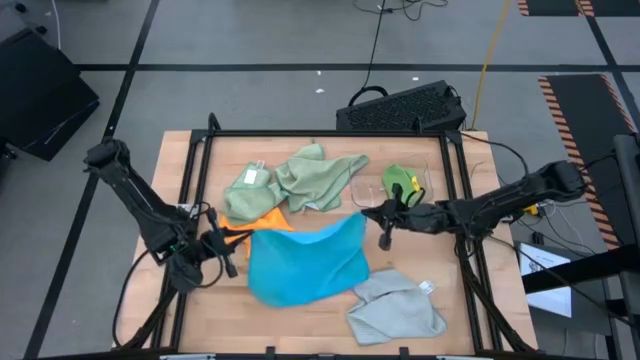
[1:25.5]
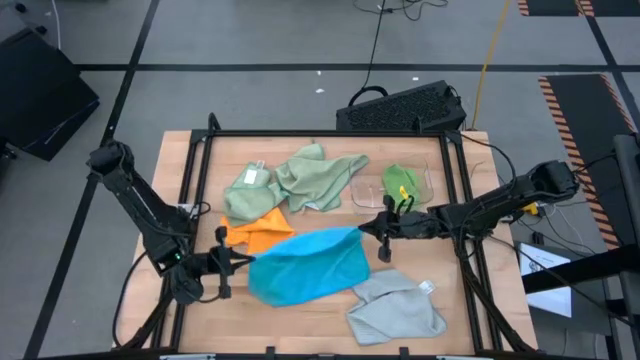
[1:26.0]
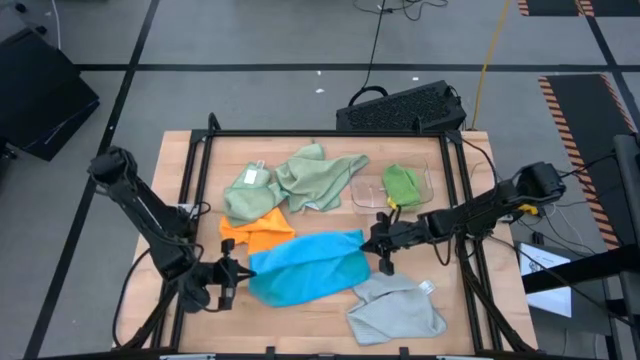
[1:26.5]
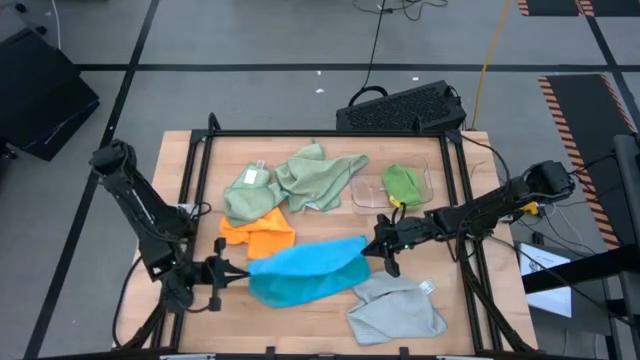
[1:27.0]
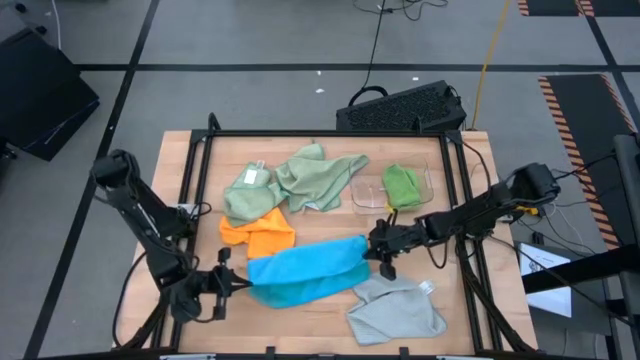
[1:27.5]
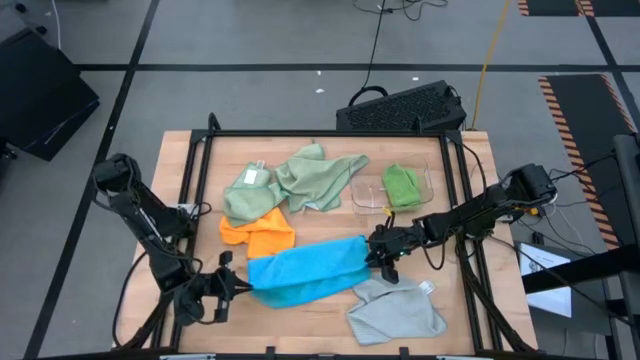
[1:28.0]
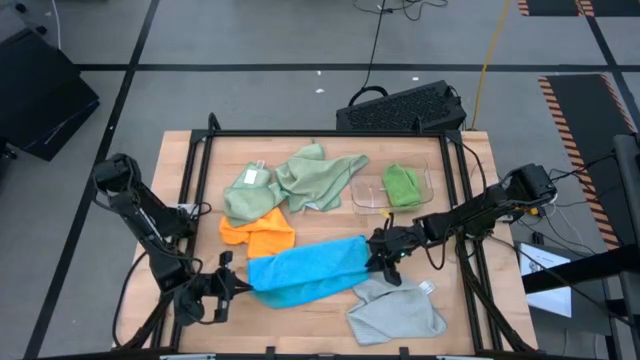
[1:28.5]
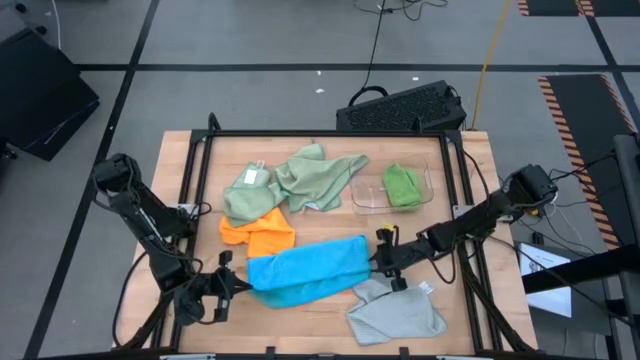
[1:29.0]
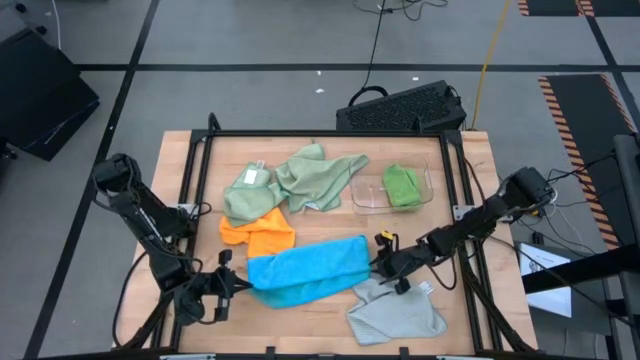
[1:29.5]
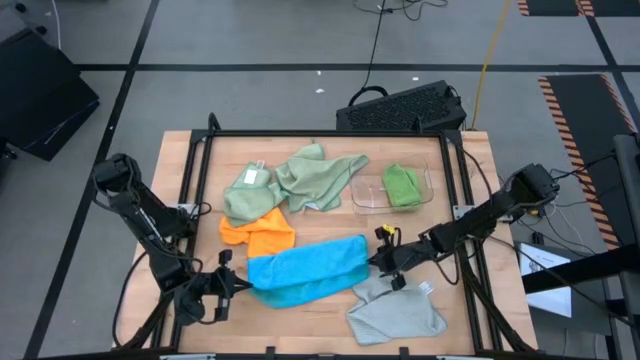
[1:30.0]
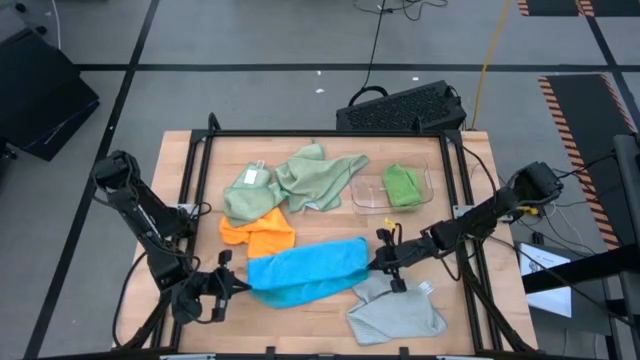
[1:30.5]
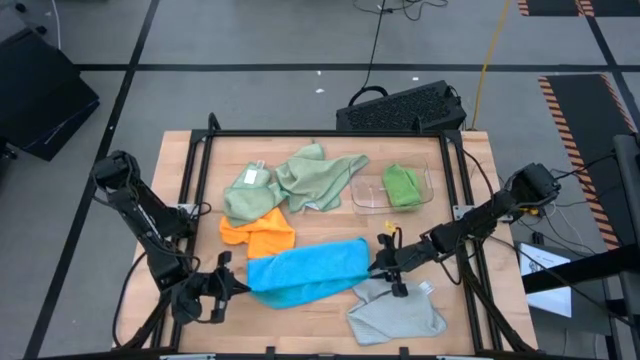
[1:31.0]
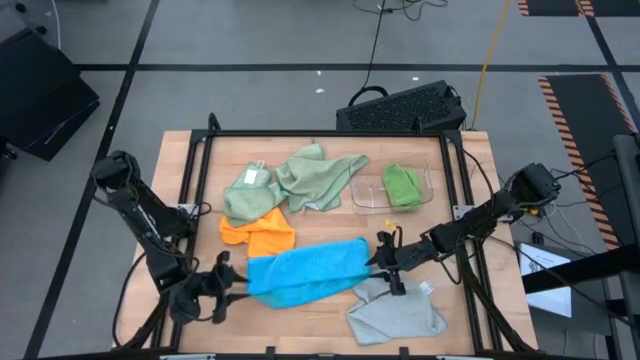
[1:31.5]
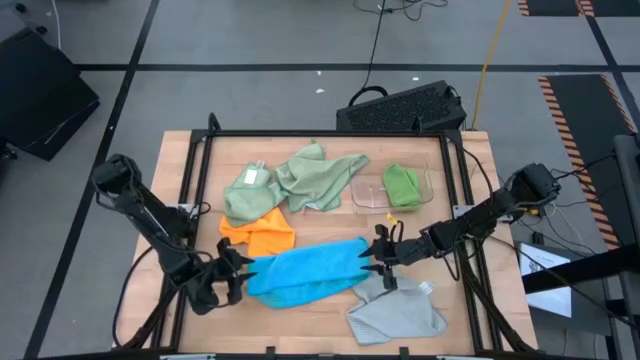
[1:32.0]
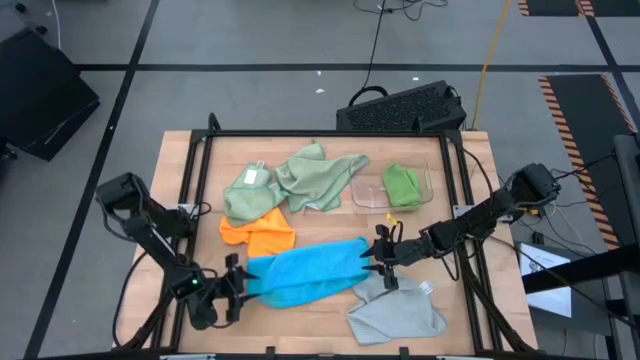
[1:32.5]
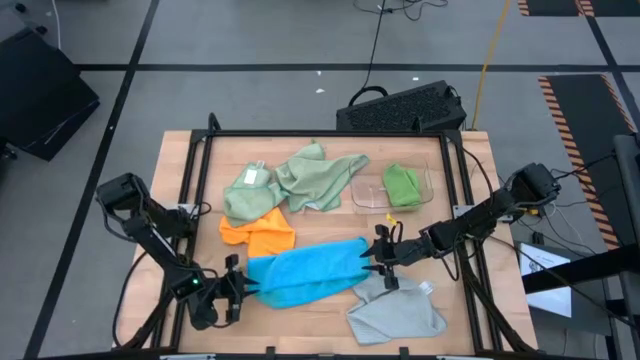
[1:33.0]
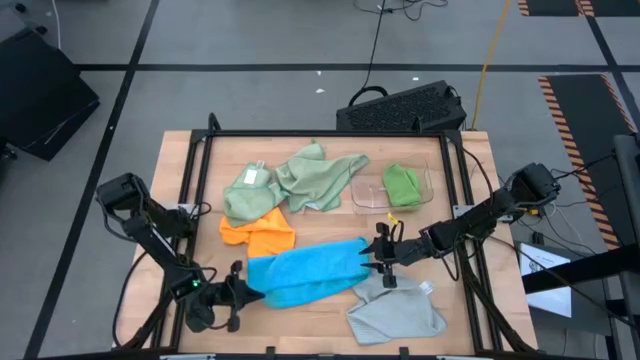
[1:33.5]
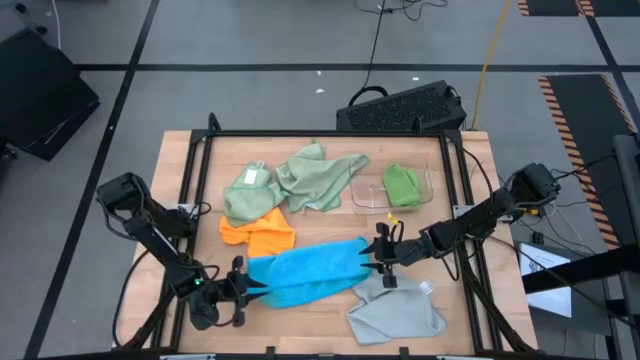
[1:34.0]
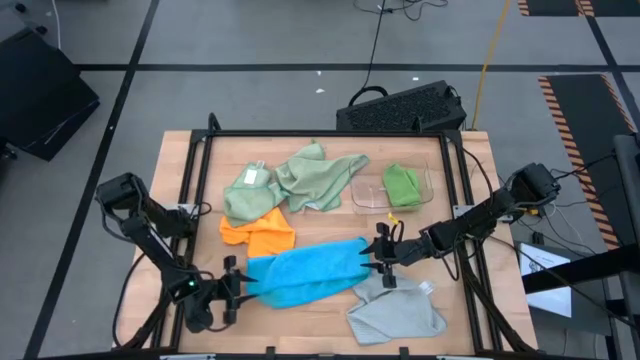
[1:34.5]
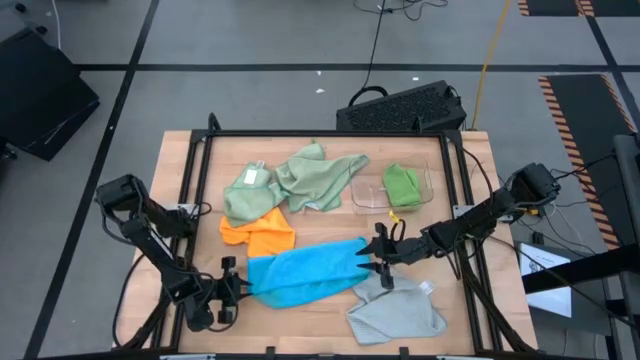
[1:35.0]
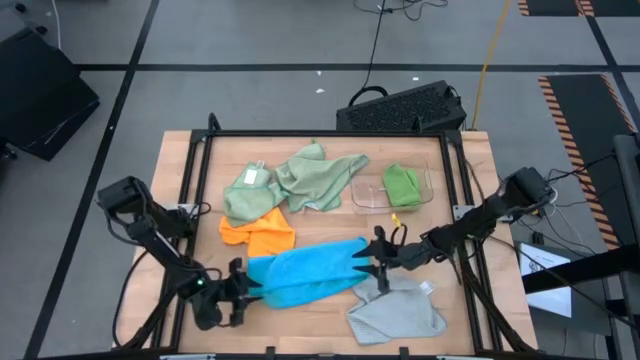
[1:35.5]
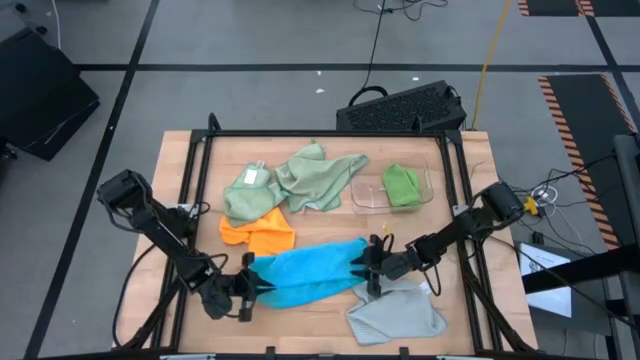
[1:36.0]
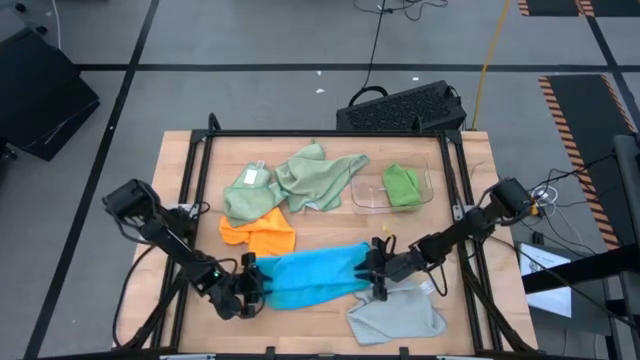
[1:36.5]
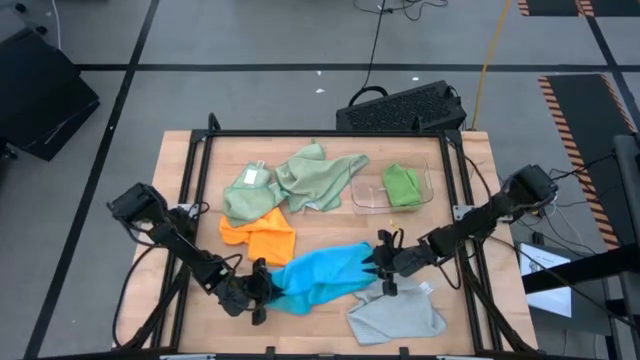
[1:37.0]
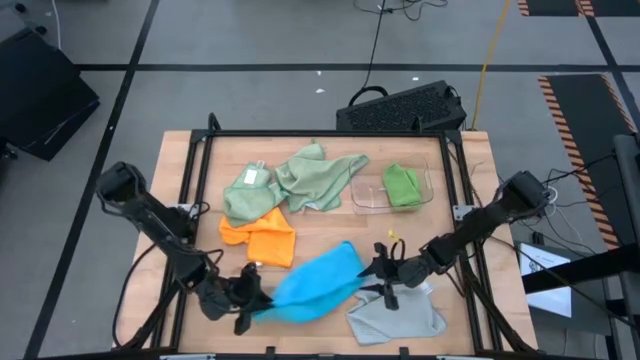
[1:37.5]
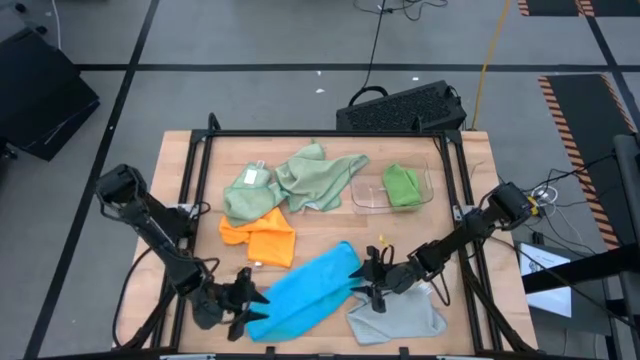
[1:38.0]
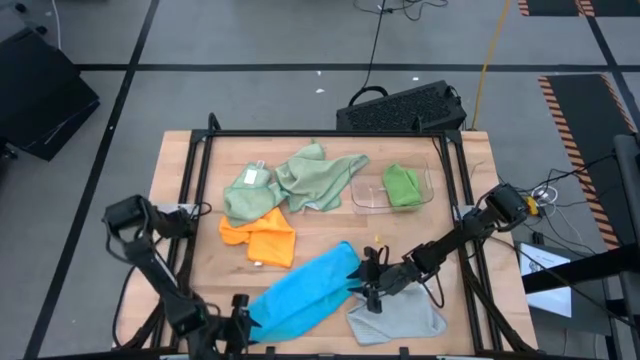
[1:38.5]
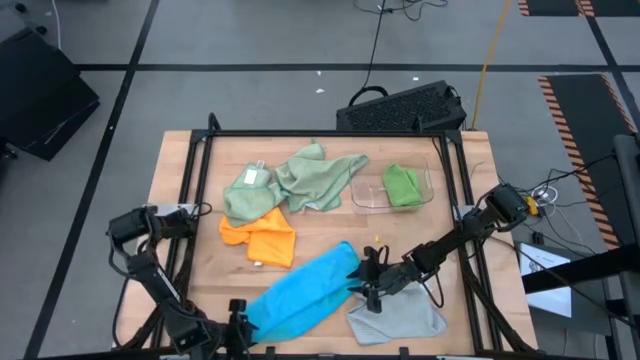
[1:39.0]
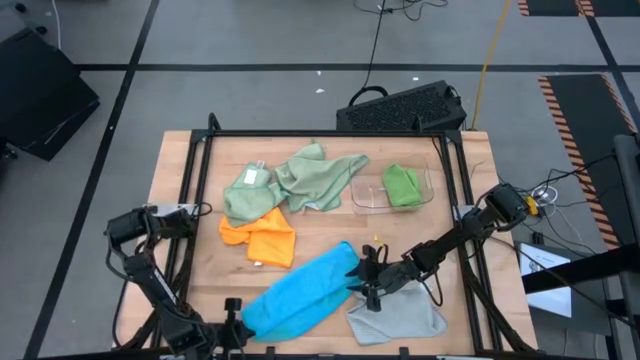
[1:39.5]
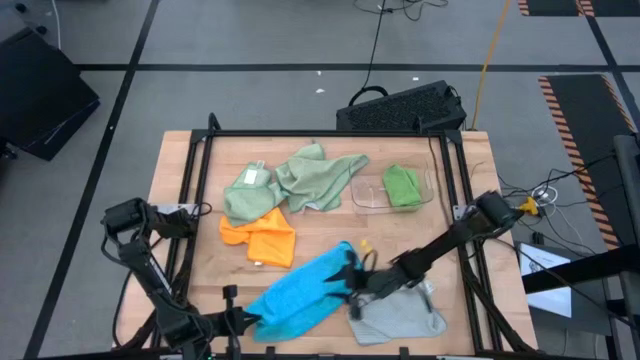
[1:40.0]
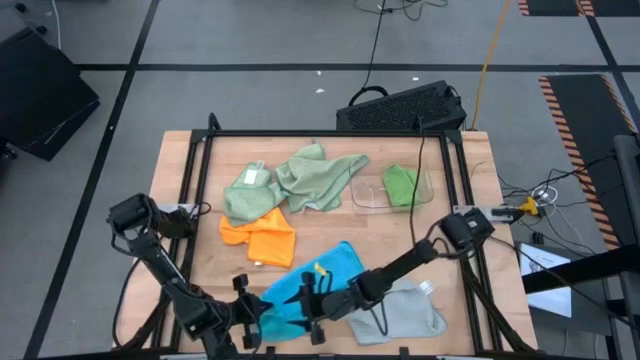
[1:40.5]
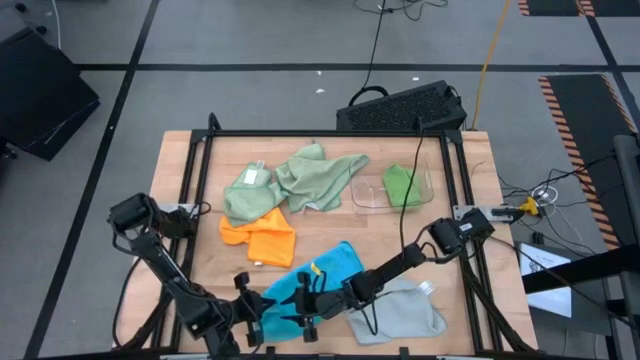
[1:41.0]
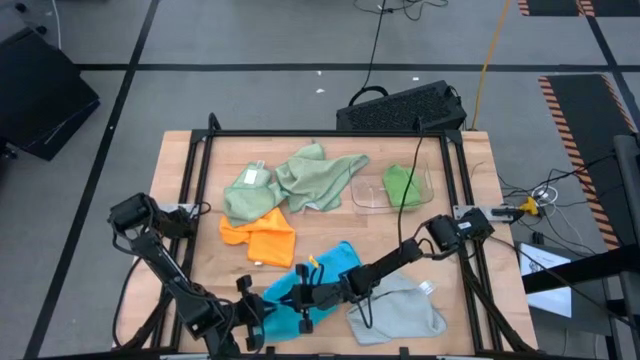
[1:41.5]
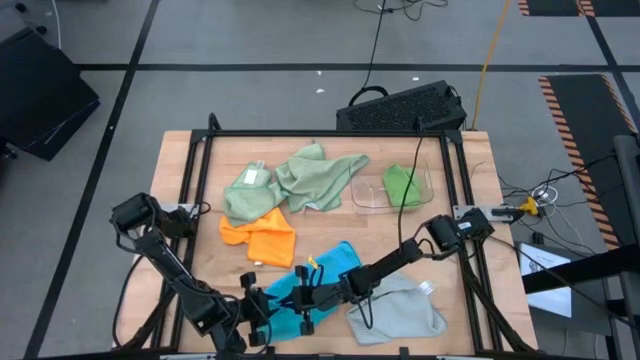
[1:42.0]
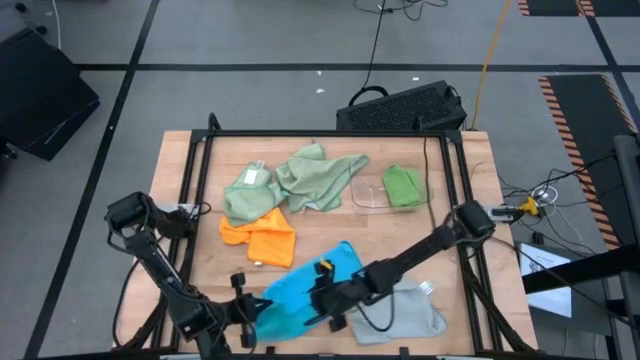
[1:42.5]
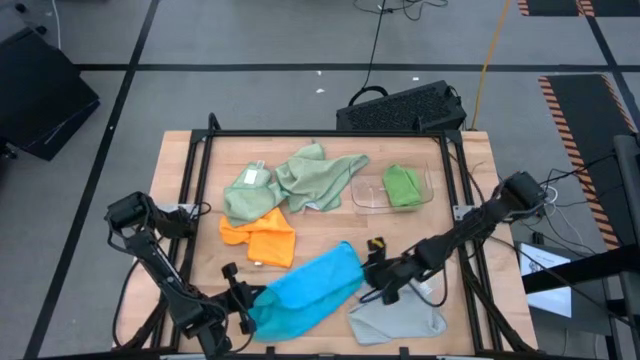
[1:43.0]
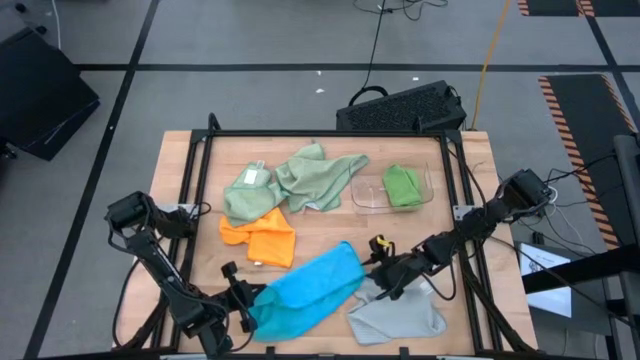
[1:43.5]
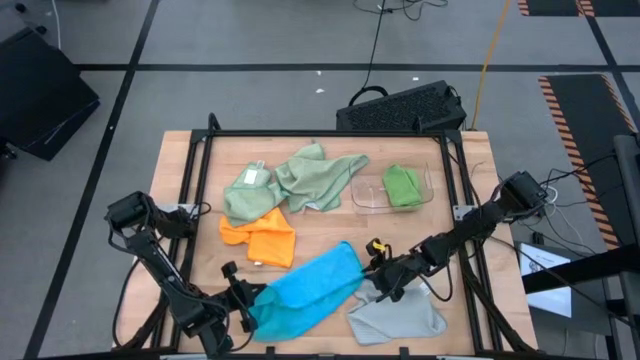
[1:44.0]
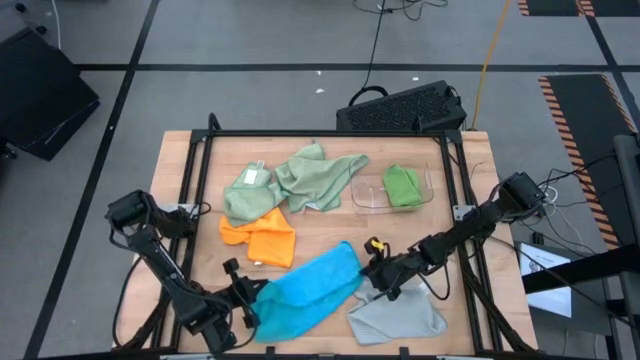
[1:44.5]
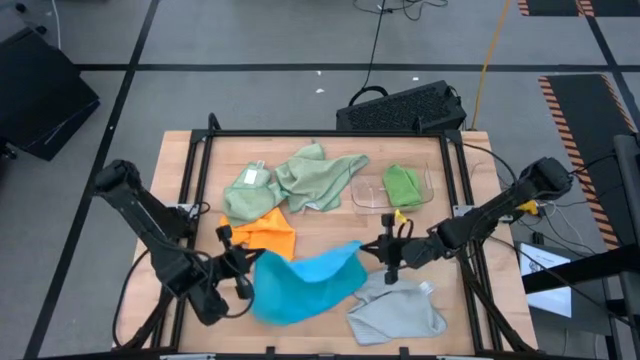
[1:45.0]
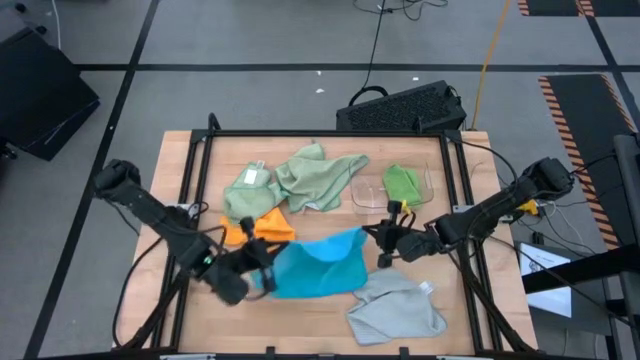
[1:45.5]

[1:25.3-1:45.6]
Task: Fold microfiber towels
Fold the blue microfiber cloth

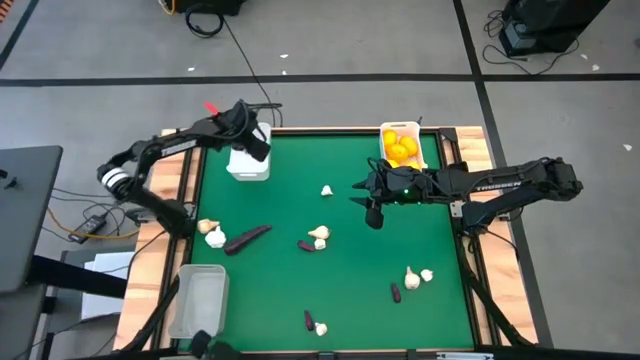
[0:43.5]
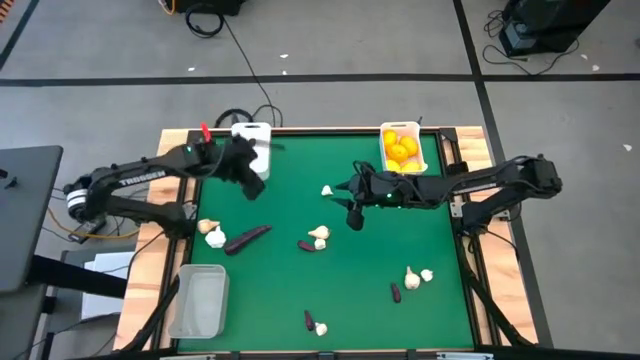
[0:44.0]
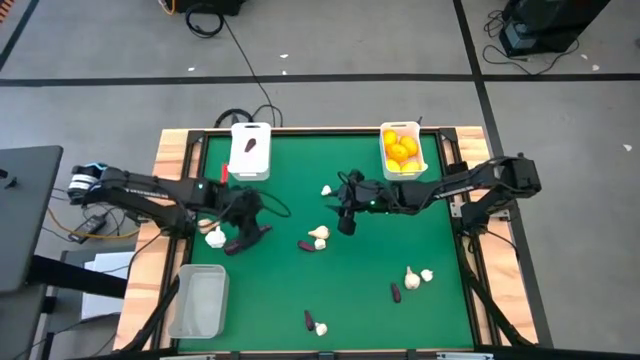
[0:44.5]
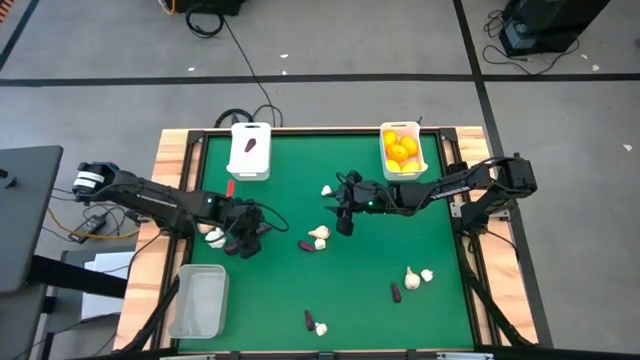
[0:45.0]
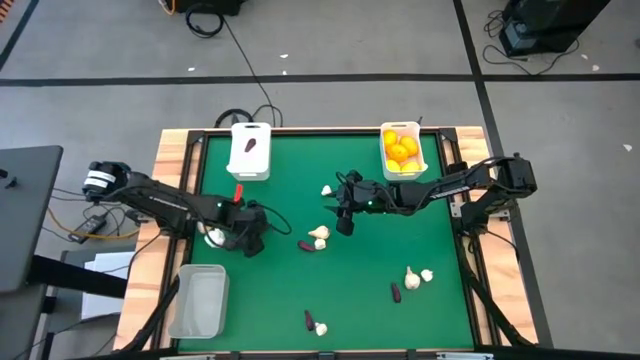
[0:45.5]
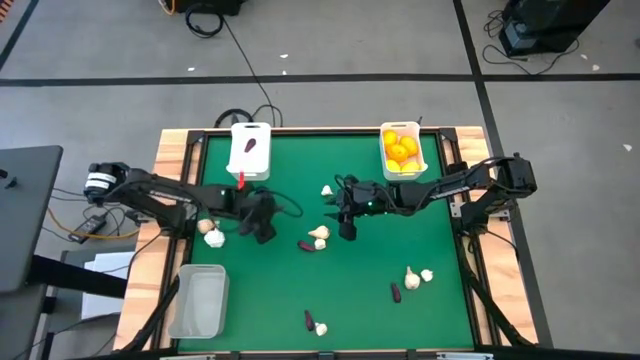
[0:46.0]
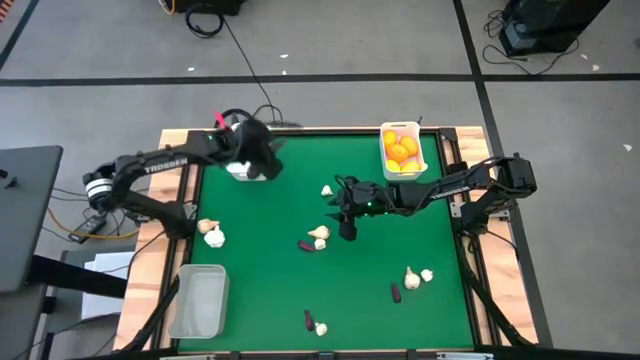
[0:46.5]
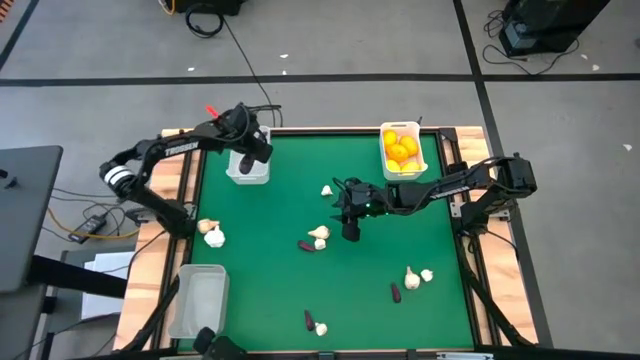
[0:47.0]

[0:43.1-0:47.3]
Task: Sort produce into baskets
Put the top left eggplant into the left white bin
